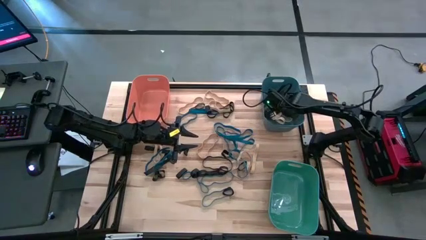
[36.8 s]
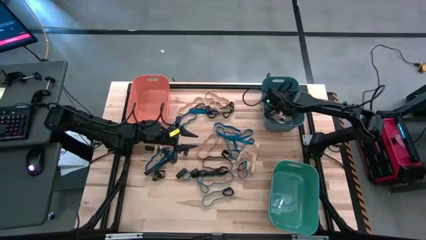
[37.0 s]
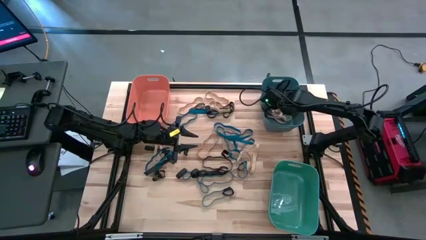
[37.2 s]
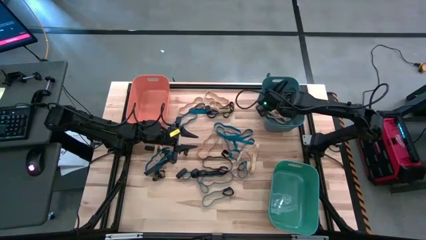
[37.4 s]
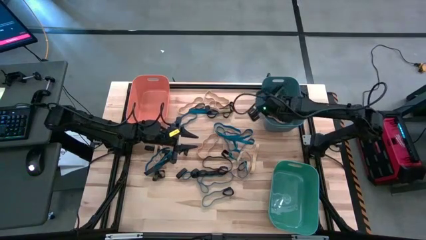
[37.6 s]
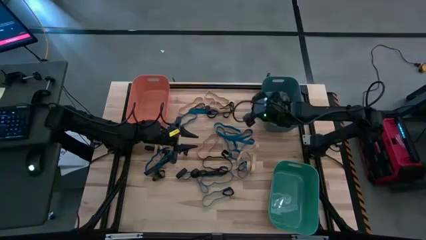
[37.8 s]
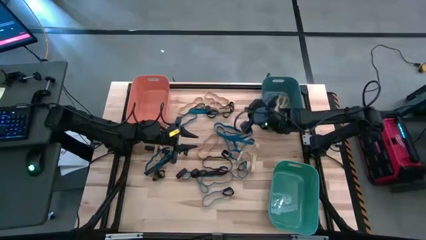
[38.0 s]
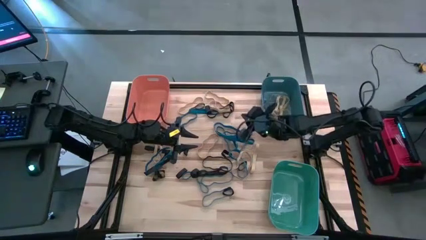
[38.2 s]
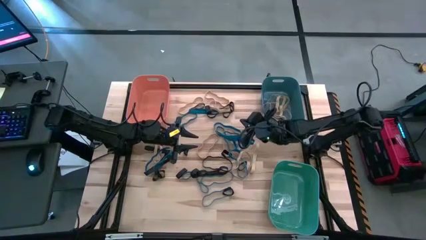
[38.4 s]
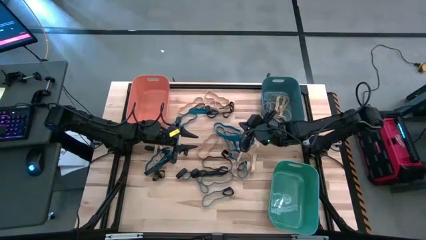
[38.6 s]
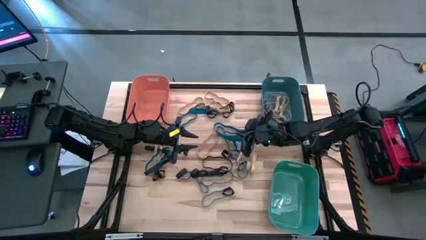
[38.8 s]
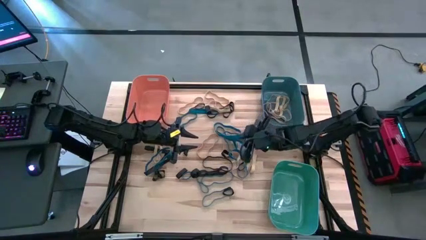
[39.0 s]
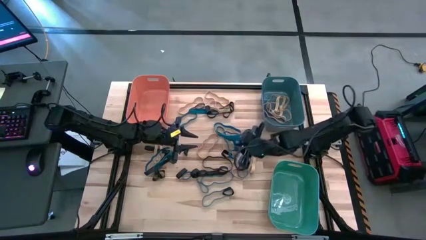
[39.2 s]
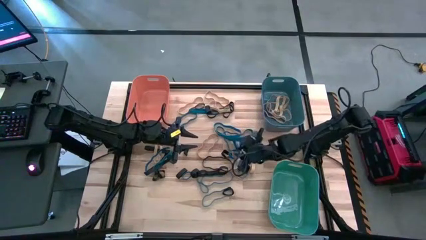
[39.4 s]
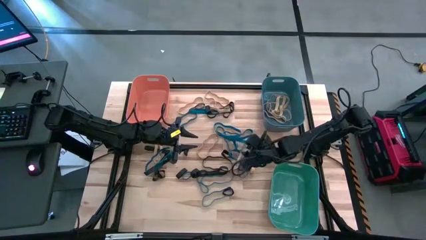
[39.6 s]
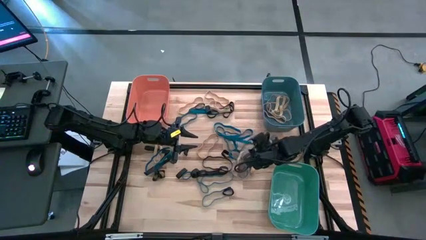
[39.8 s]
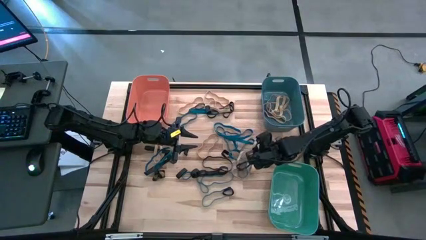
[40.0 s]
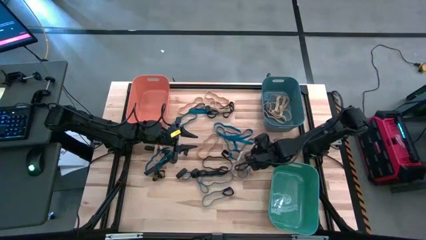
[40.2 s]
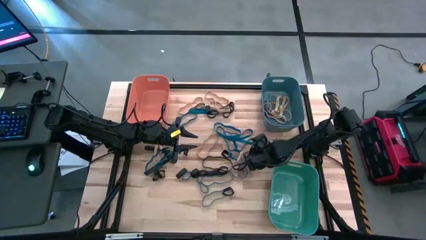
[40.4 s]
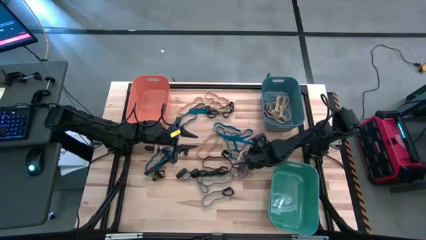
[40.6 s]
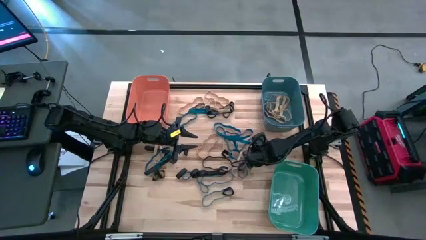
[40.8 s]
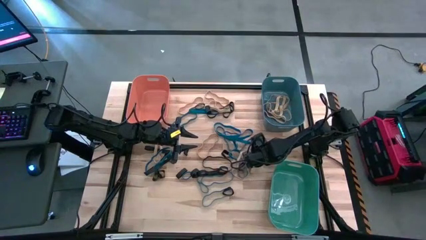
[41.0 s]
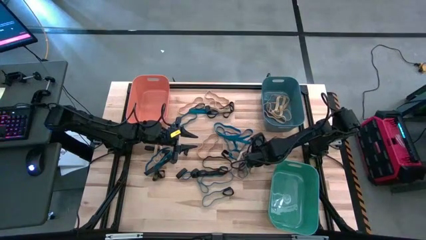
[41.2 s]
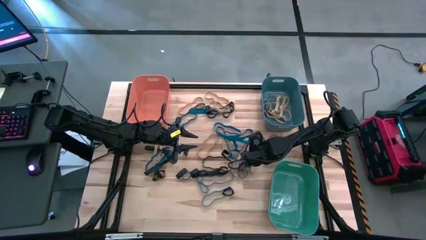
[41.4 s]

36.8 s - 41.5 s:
Task: Sort rubber bands into baskets
Put the white rubber band into the blue bin

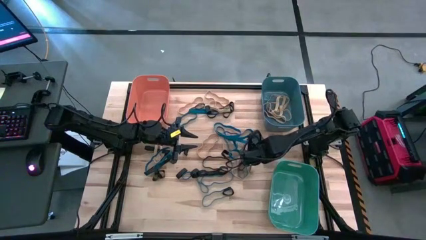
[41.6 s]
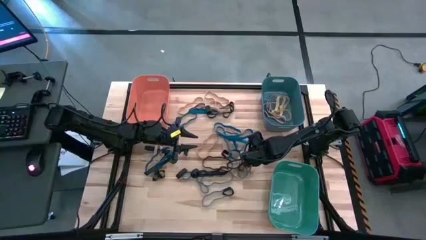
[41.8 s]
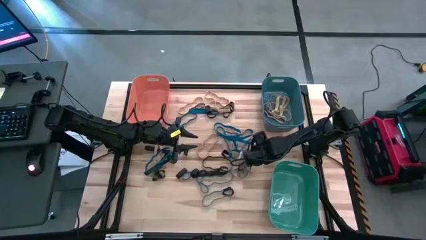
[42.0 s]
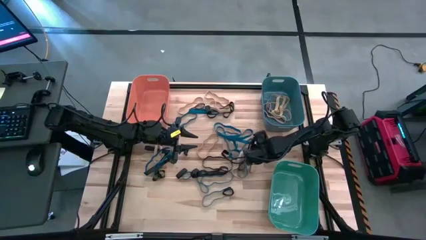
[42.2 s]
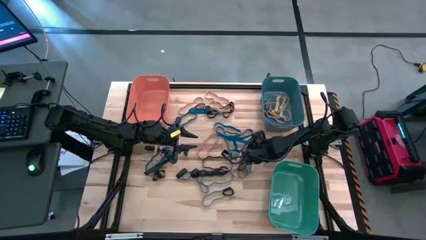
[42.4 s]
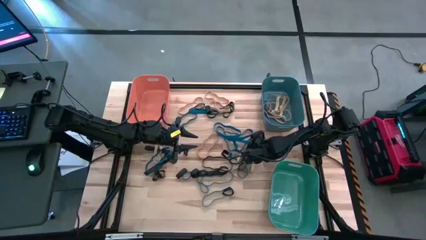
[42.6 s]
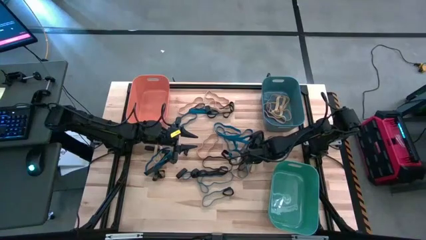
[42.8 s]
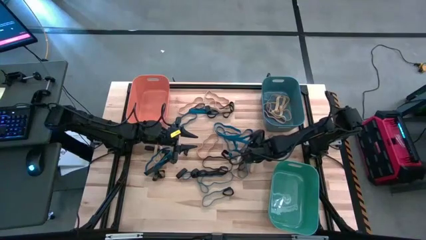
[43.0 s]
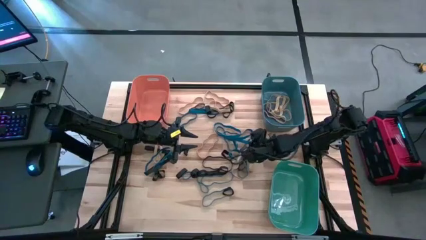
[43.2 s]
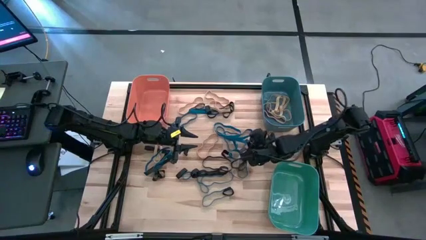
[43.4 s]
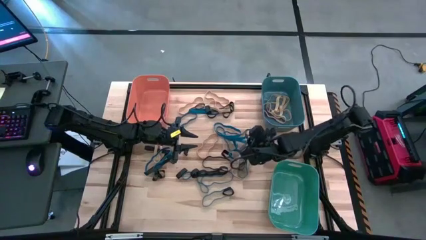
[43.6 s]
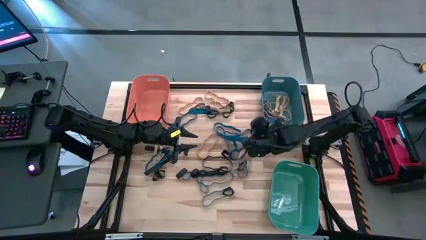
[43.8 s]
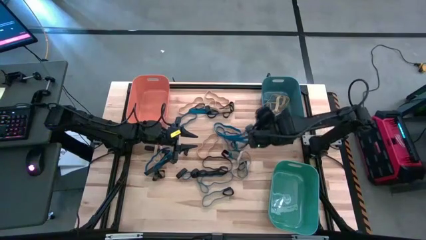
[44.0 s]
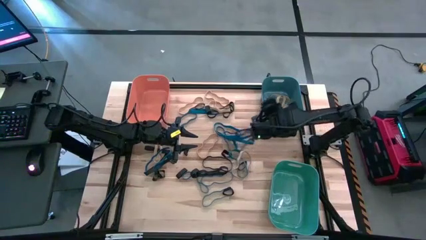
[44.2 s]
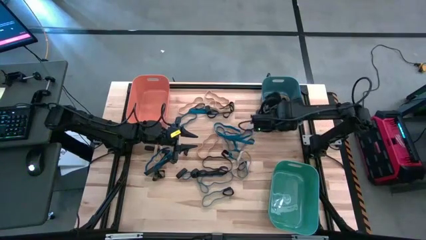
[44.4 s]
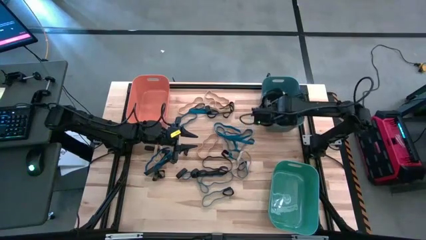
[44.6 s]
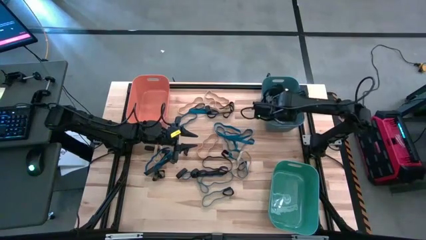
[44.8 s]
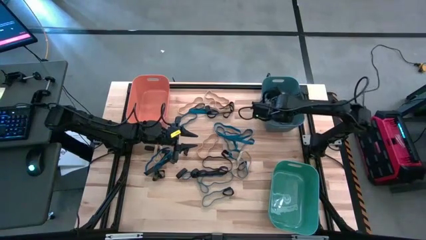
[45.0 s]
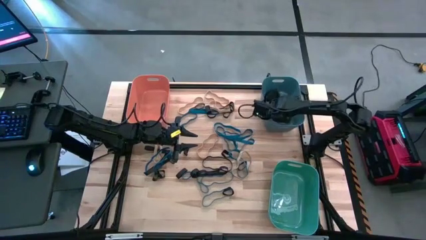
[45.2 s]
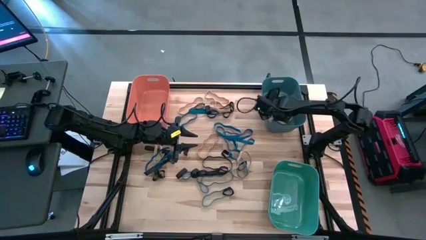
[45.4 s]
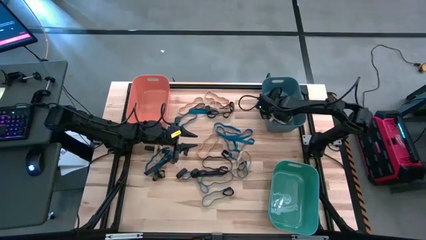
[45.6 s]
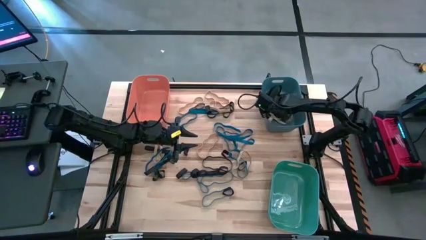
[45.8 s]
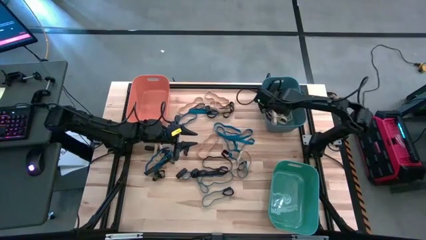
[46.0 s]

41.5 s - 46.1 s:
Put the white rubber band into the blue bin

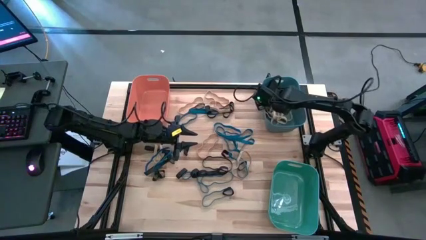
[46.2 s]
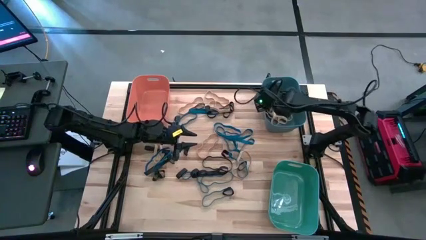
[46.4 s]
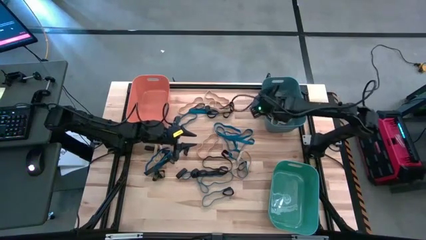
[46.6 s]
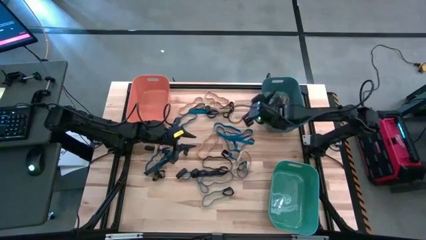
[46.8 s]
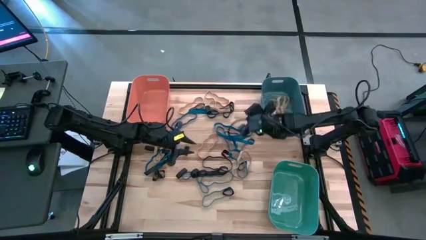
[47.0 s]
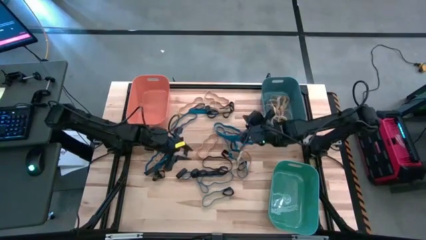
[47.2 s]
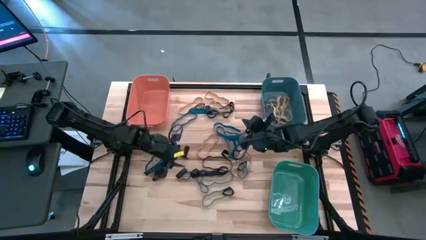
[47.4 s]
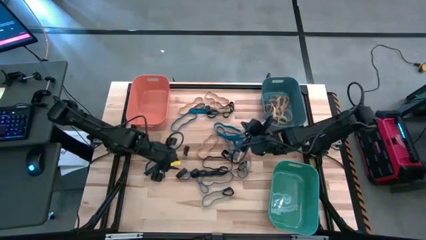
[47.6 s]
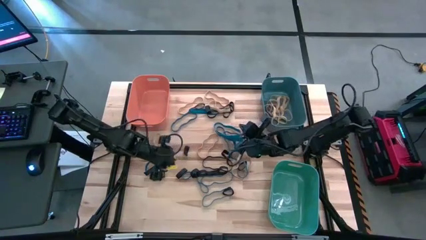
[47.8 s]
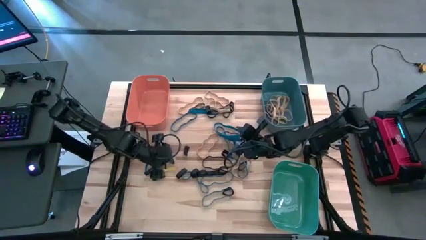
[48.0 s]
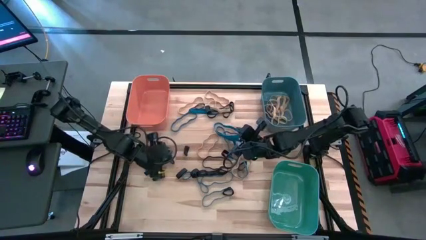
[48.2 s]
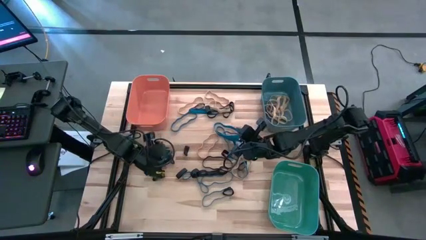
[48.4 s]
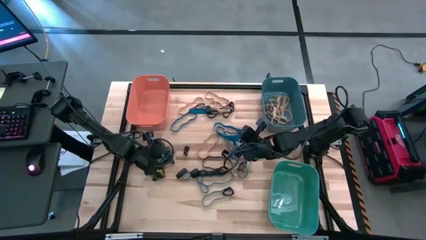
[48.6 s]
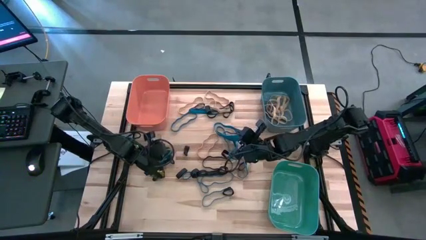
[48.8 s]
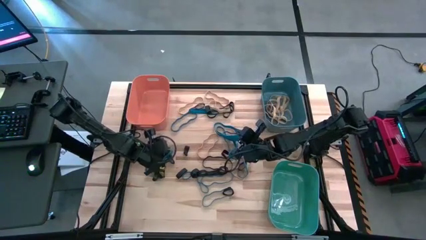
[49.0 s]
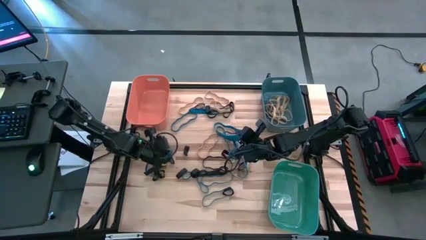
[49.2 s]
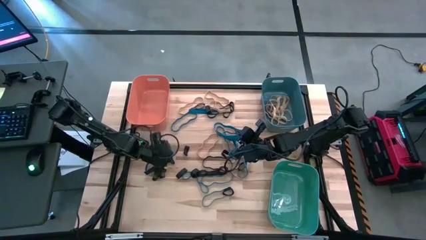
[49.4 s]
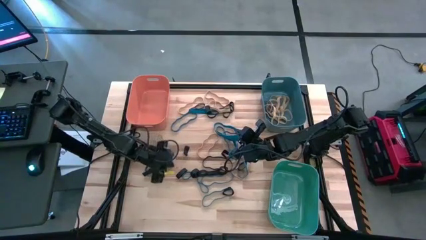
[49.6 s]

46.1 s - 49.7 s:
Put the white rubber band into the blue bin

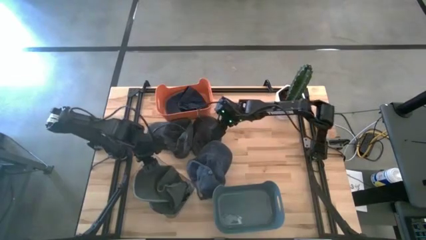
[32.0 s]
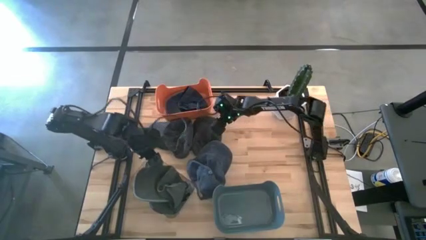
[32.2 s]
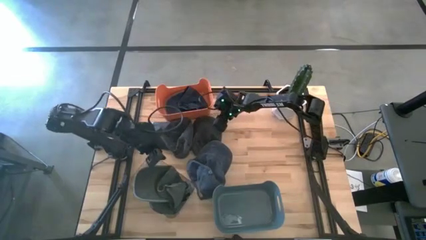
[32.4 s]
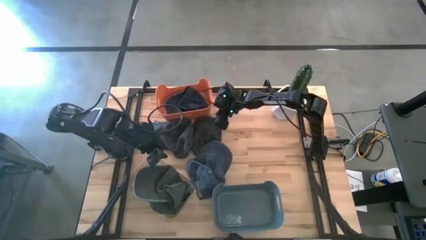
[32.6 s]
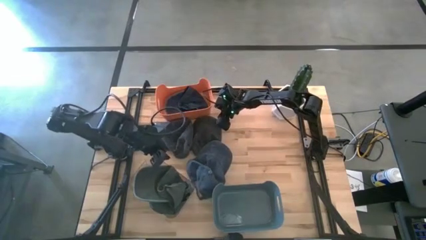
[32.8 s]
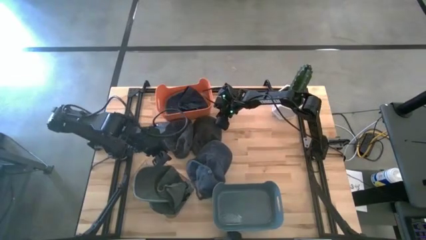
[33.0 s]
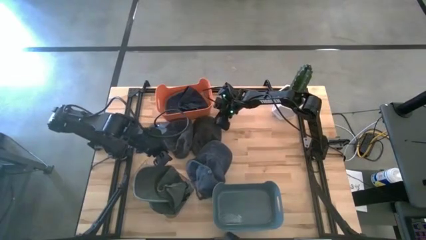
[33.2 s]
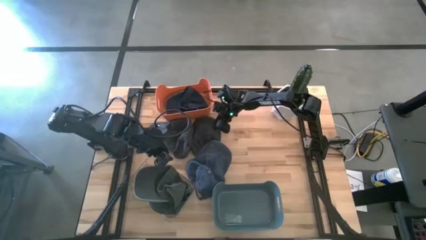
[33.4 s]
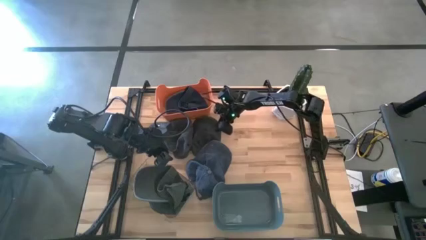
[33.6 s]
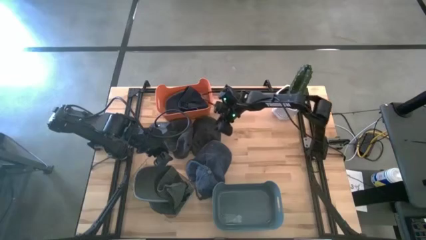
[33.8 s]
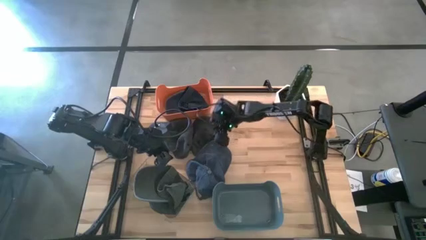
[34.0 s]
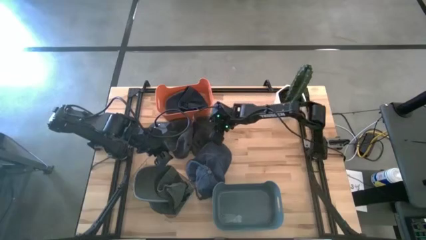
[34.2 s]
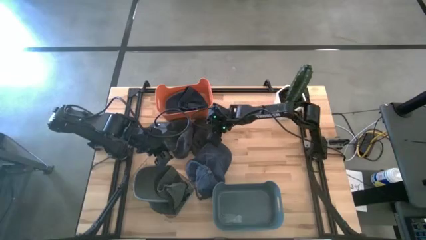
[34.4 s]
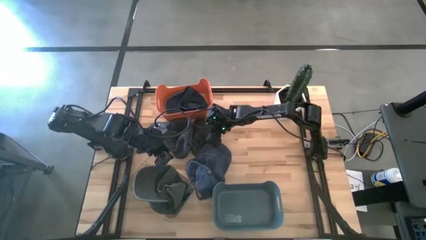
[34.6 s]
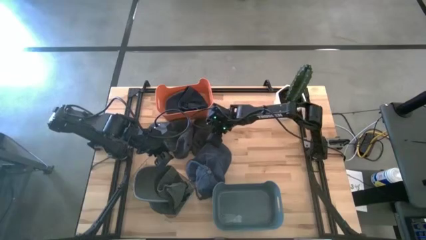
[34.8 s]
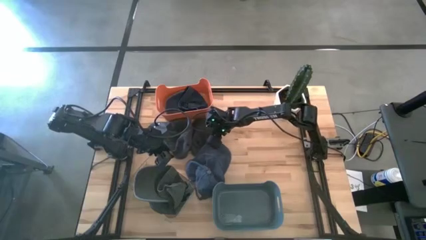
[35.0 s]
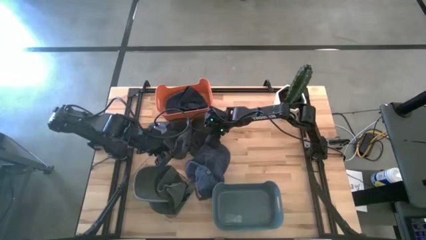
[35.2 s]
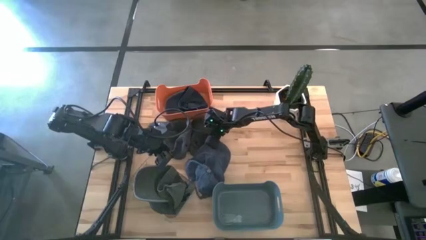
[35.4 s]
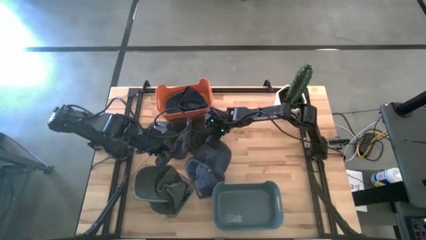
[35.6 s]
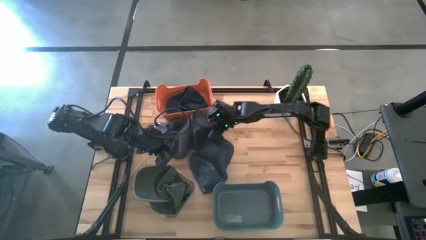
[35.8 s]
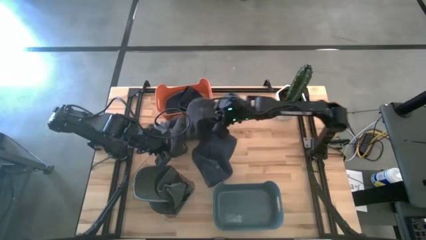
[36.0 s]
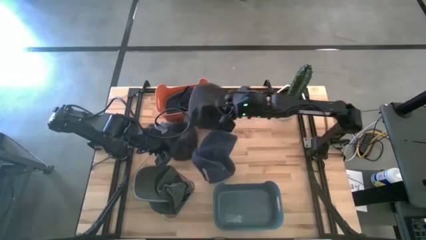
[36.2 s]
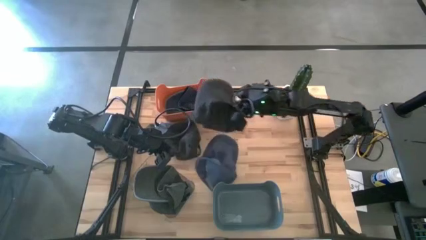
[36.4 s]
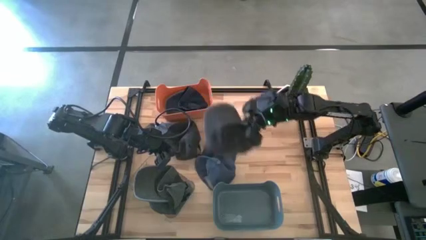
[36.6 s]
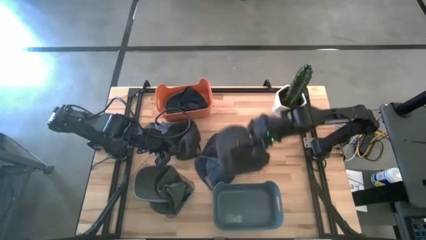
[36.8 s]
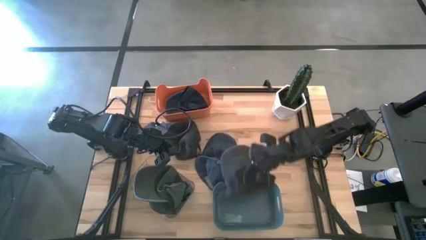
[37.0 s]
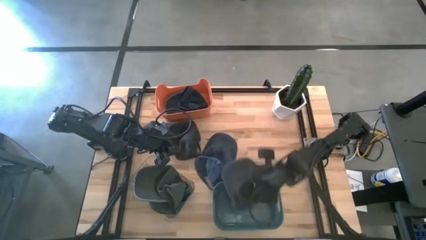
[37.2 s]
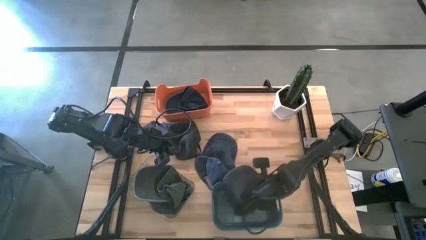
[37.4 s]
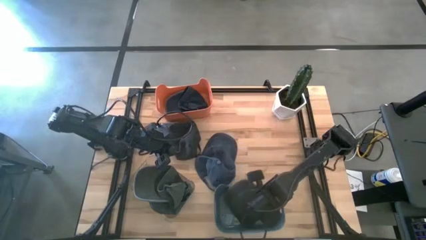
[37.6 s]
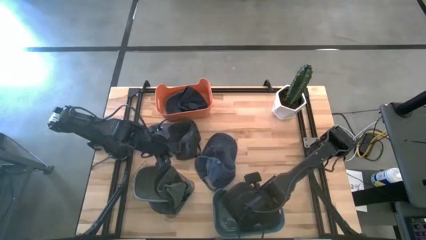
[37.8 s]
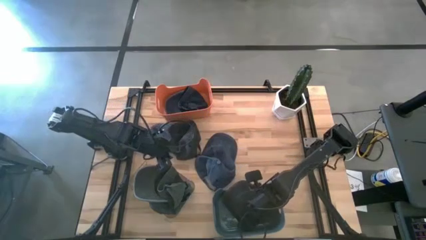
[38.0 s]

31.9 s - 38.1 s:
Task: Pick & Place hat
Put the right black cap into the blue bin
